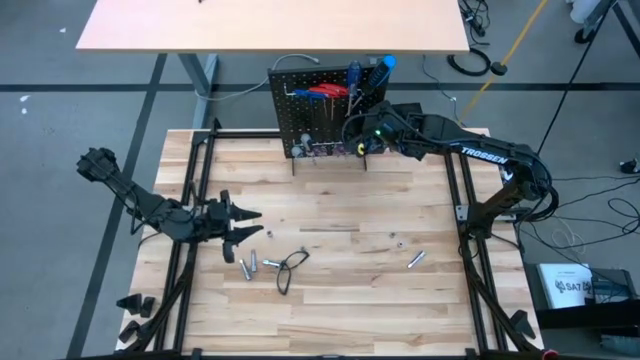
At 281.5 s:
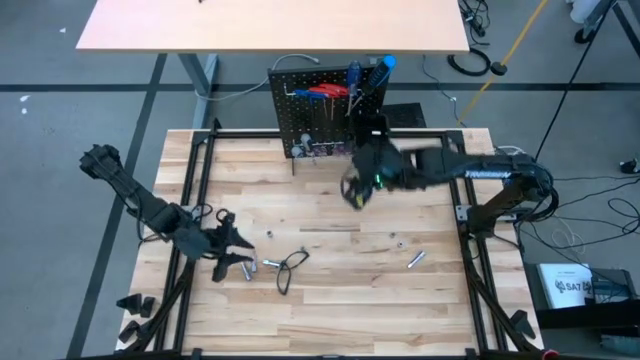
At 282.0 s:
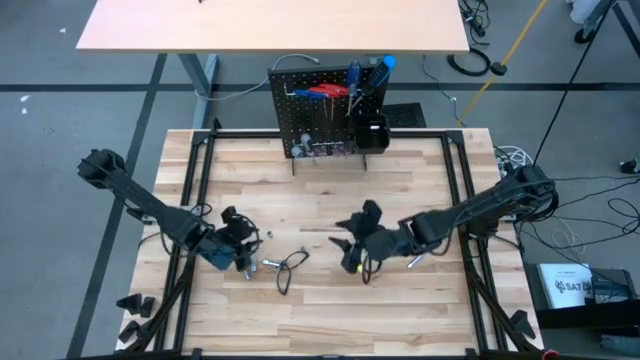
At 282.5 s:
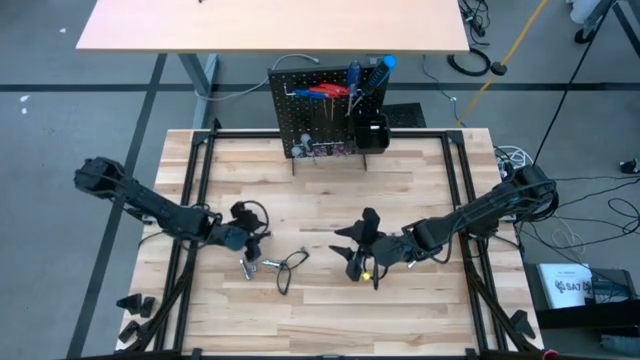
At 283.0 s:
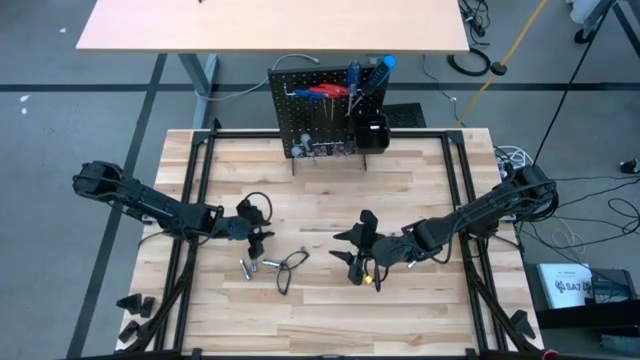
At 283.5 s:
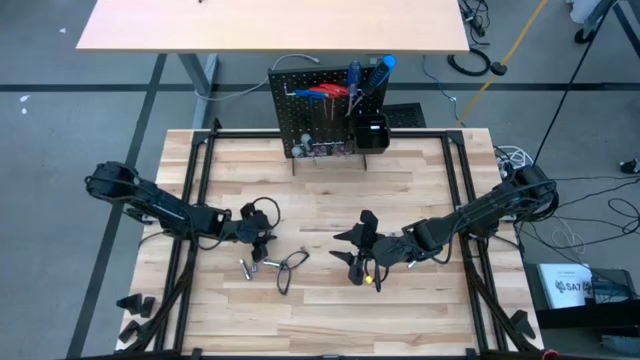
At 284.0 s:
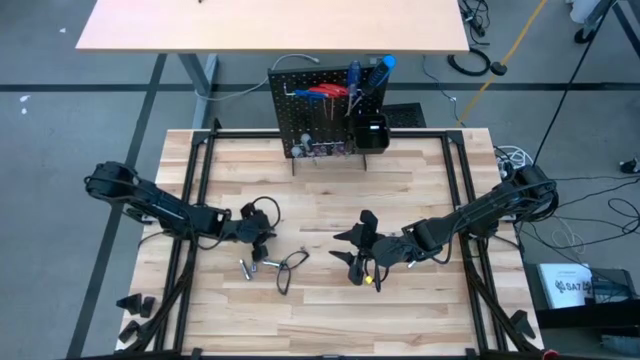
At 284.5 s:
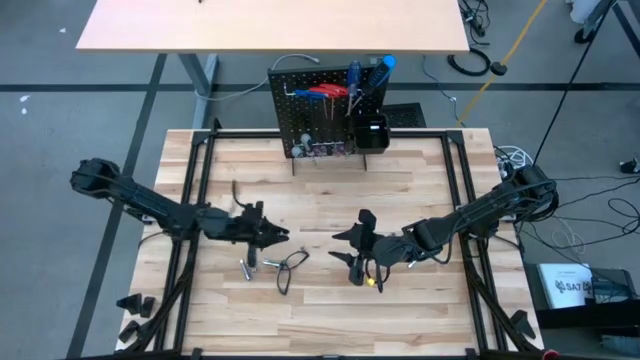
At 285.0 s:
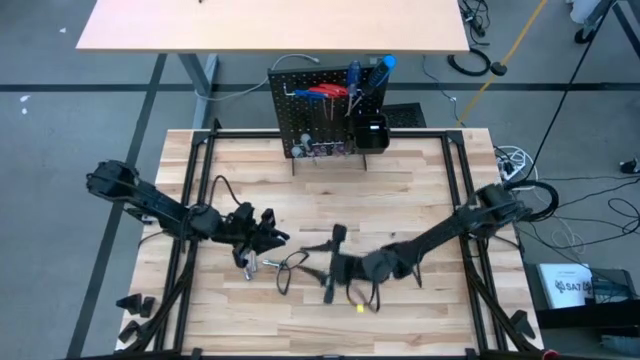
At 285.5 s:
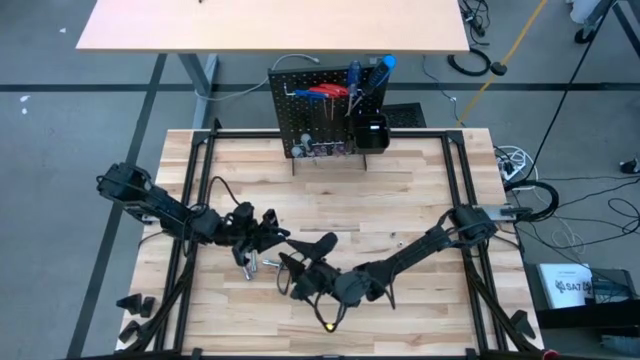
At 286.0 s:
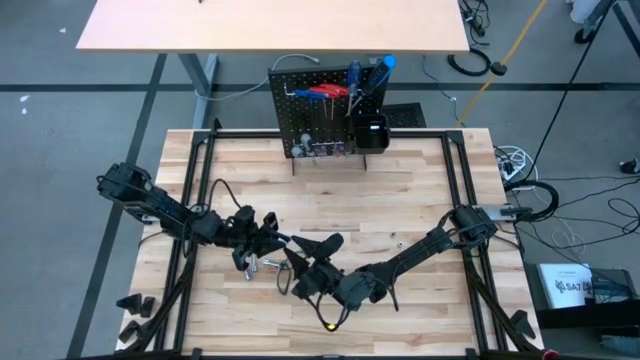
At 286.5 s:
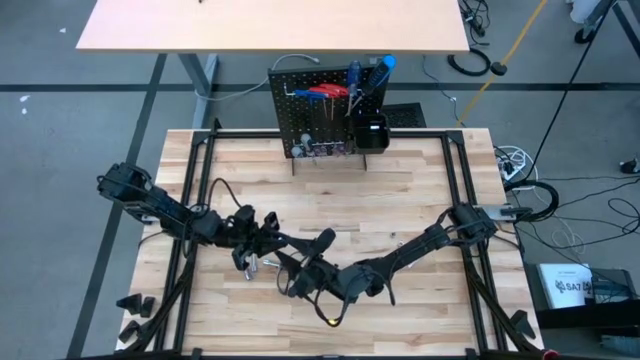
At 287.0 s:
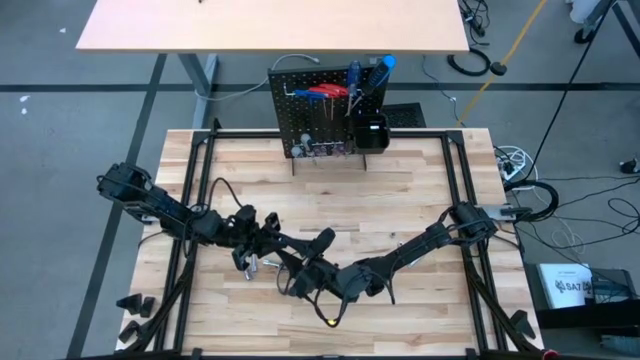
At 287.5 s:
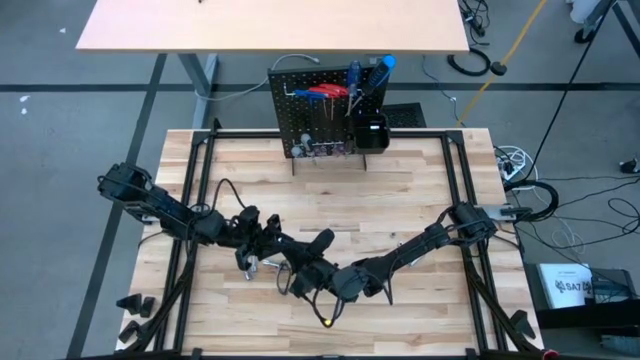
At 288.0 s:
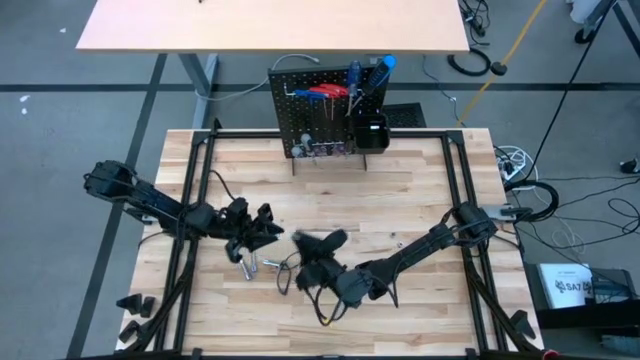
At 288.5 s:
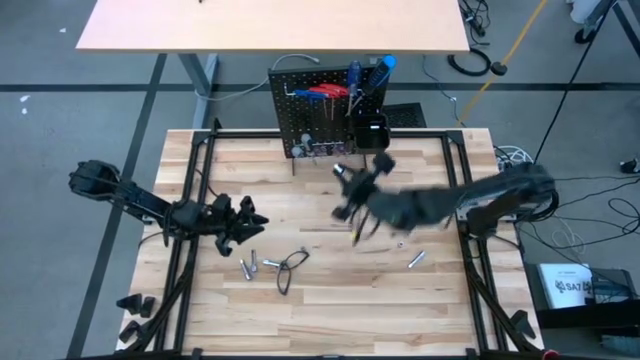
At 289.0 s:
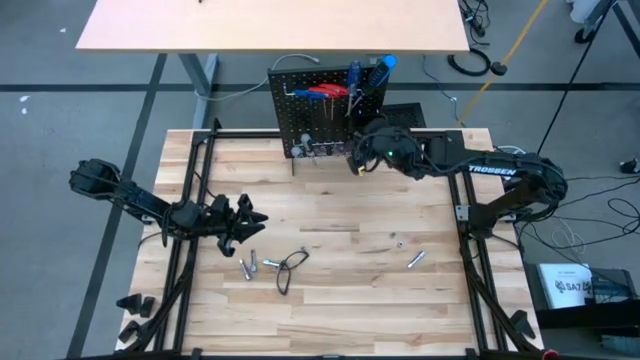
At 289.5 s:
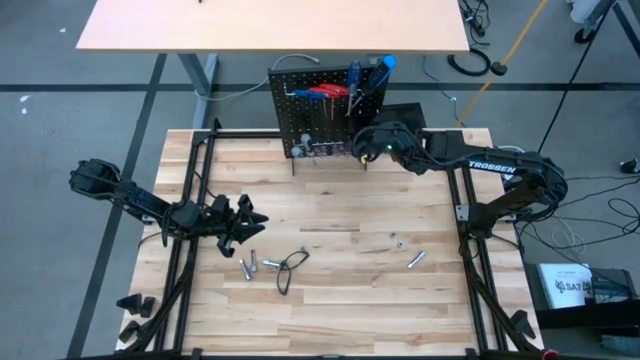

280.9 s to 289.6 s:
Task: Hang tools onto peg board
Put the socket into the black bin on the peg board

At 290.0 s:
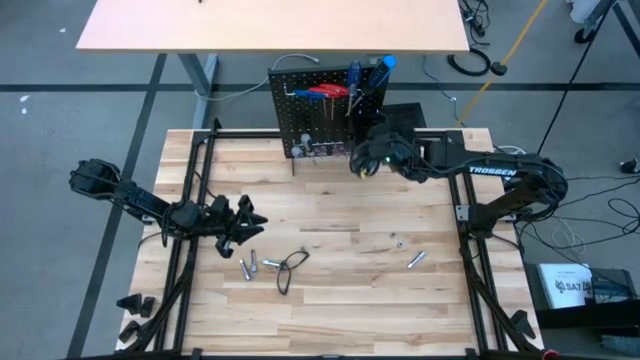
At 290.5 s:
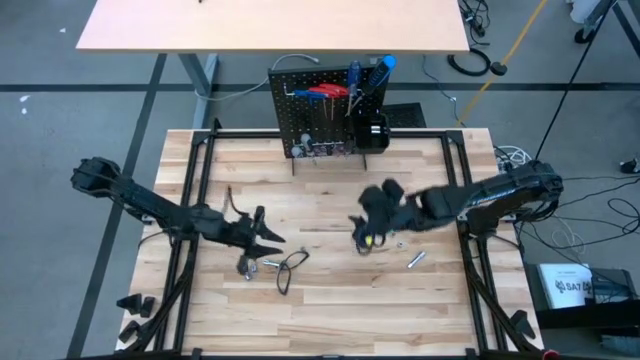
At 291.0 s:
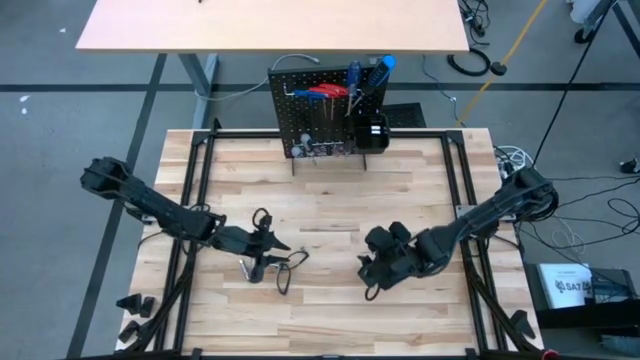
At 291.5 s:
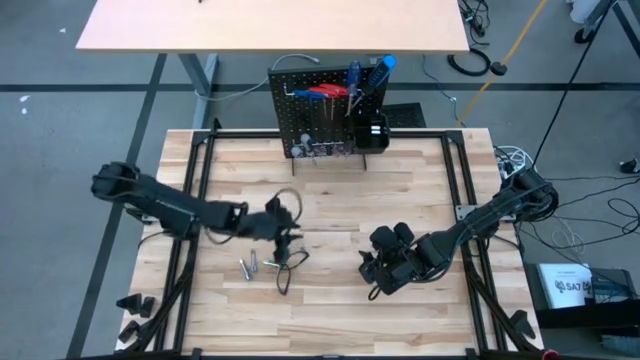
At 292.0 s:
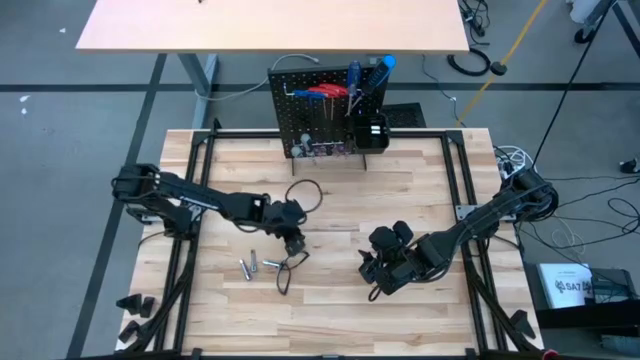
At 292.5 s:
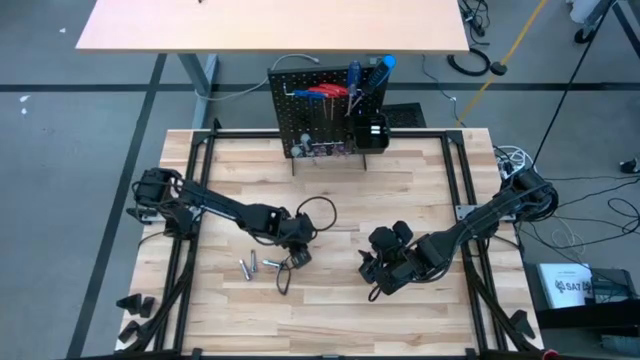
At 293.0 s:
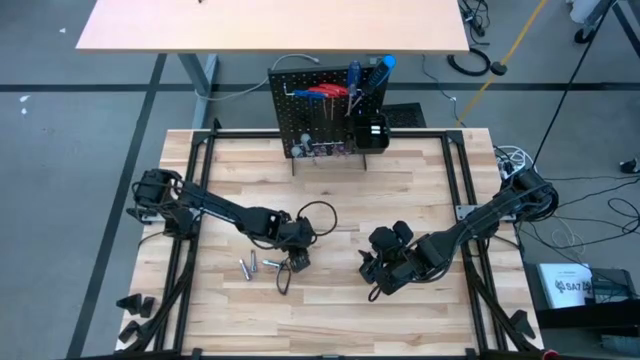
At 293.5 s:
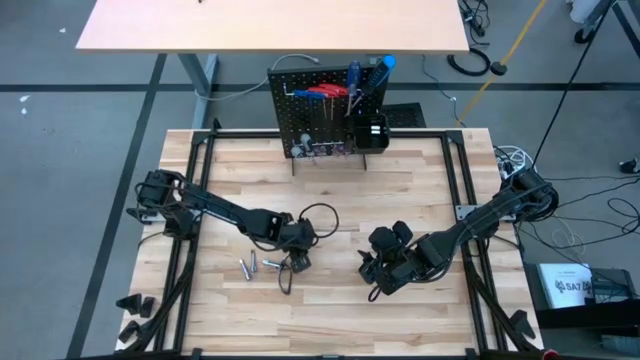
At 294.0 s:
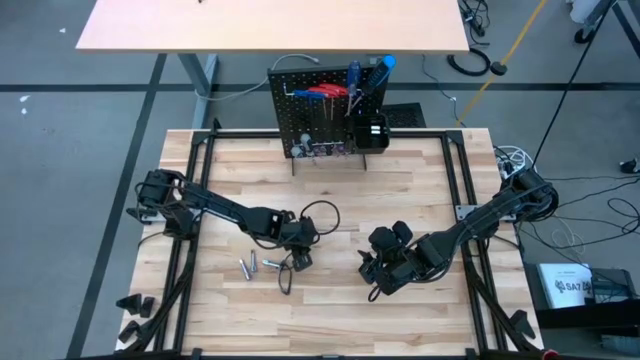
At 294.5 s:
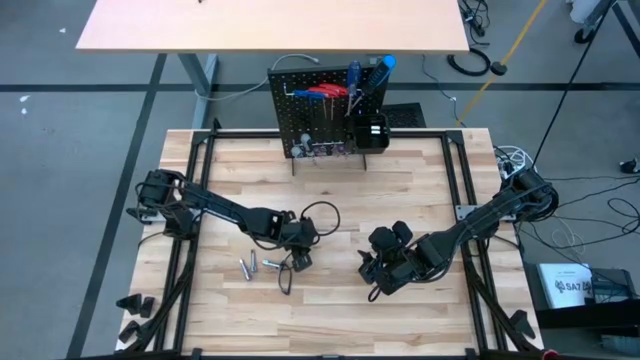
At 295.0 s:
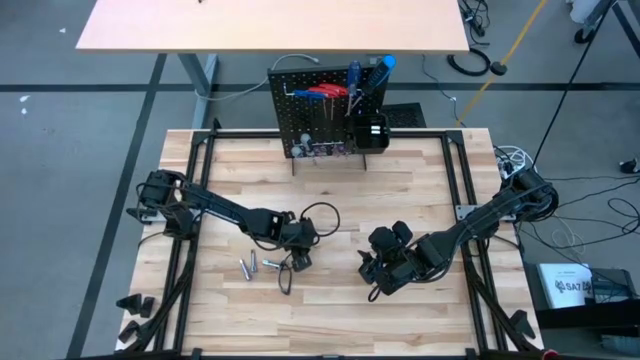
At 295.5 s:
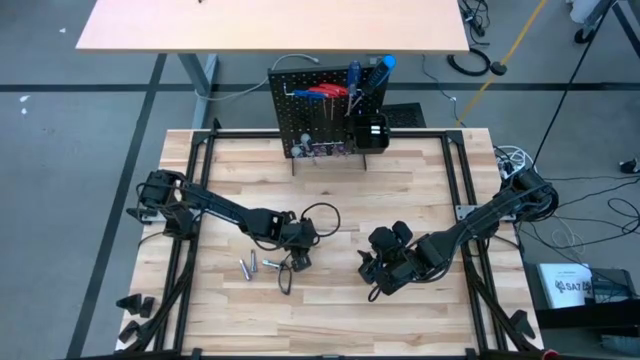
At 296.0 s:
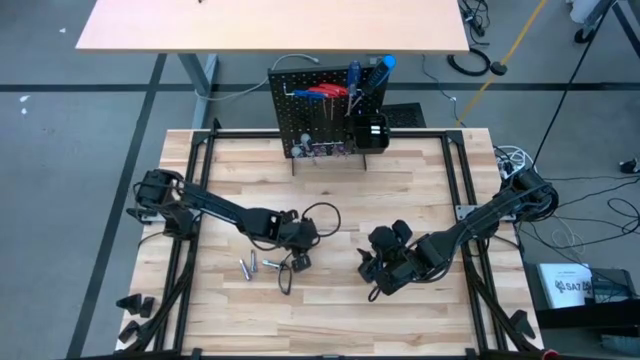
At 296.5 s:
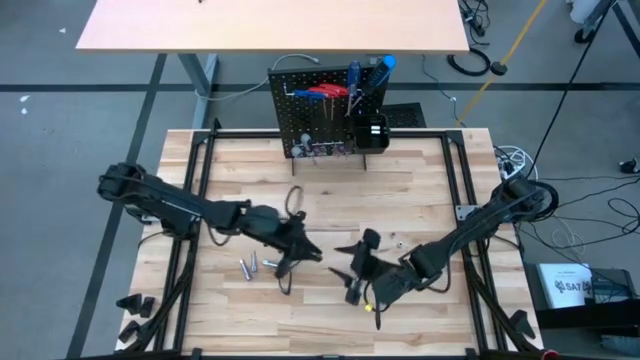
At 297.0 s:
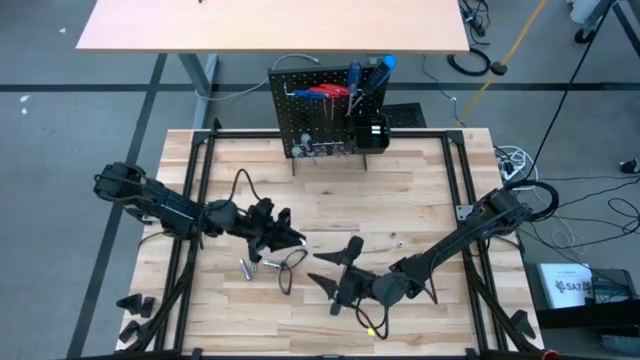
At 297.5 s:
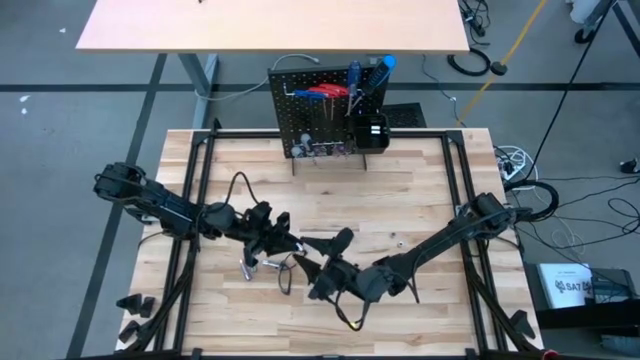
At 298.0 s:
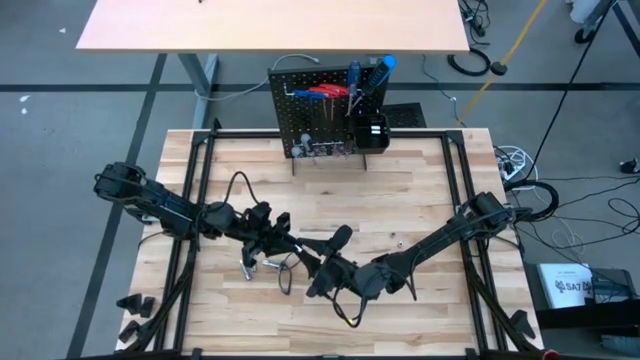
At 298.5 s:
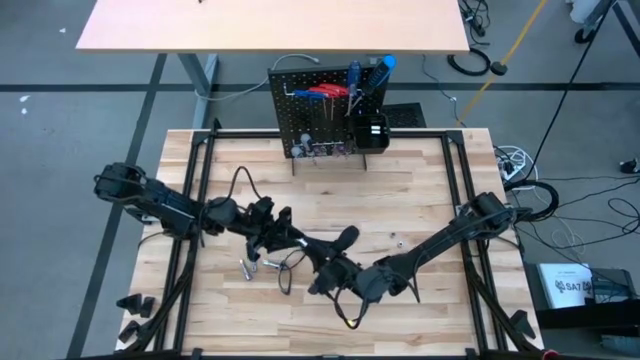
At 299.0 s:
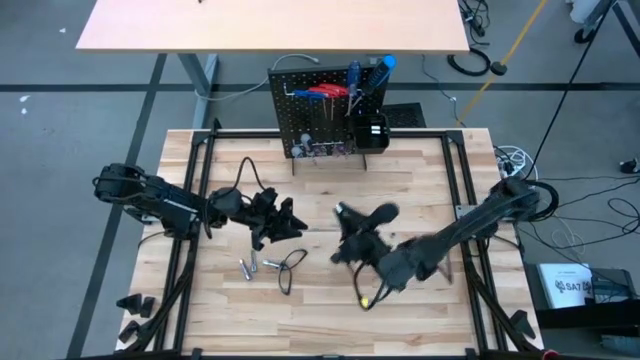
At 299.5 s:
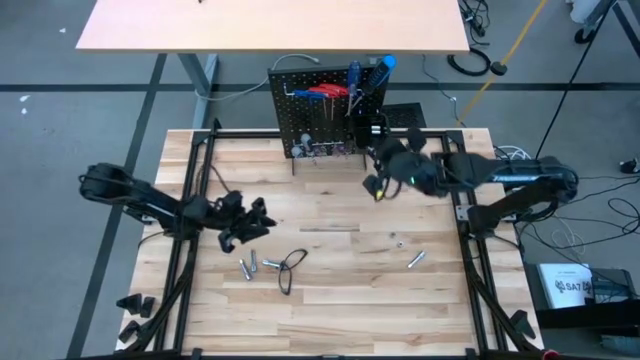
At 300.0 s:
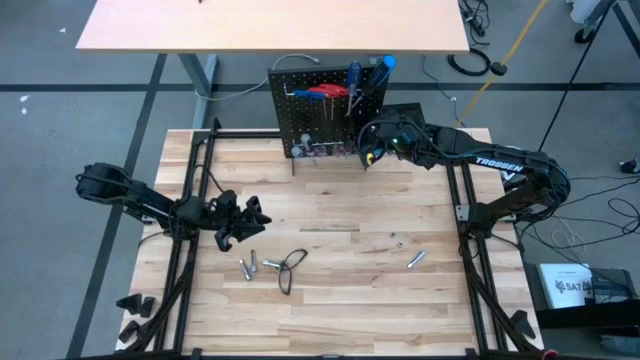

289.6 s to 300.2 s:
Put the left socket into the black bin on the peg board

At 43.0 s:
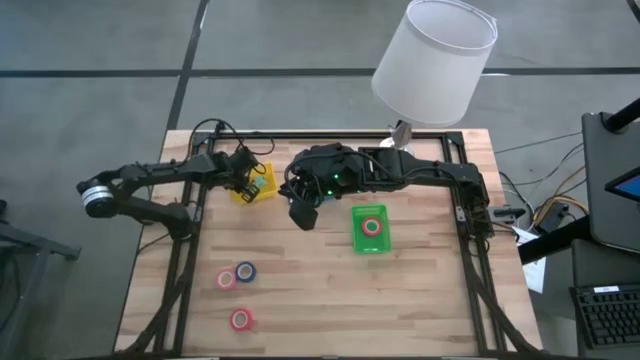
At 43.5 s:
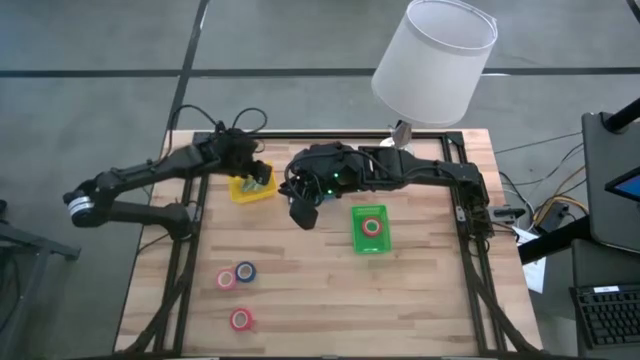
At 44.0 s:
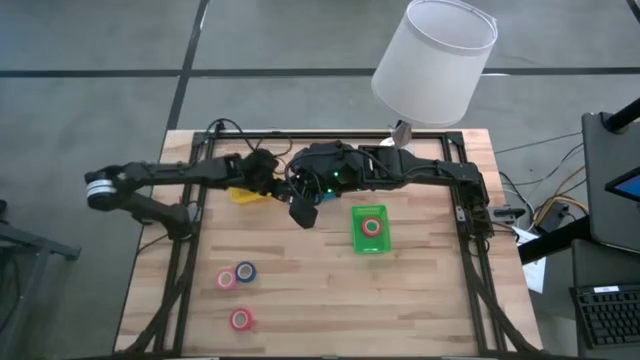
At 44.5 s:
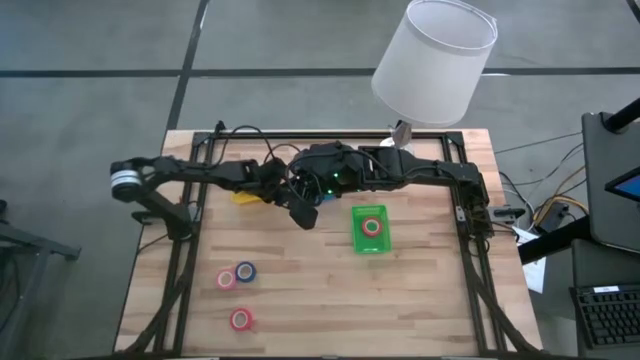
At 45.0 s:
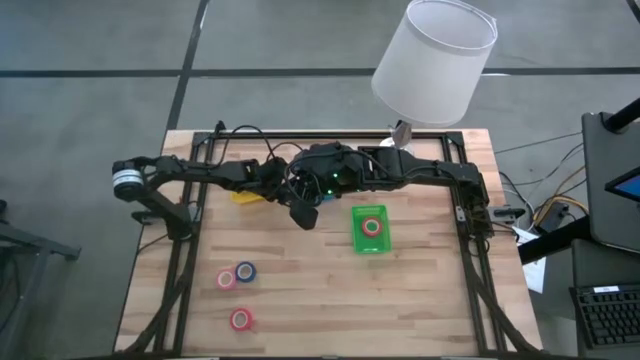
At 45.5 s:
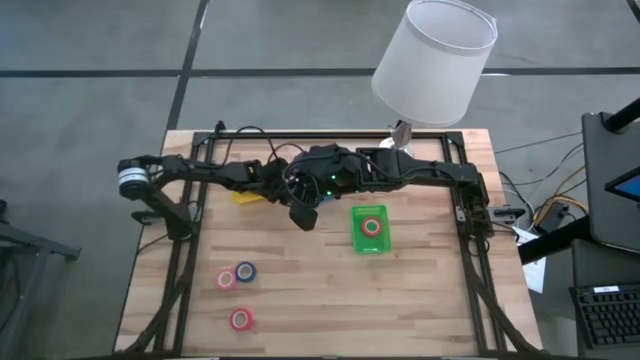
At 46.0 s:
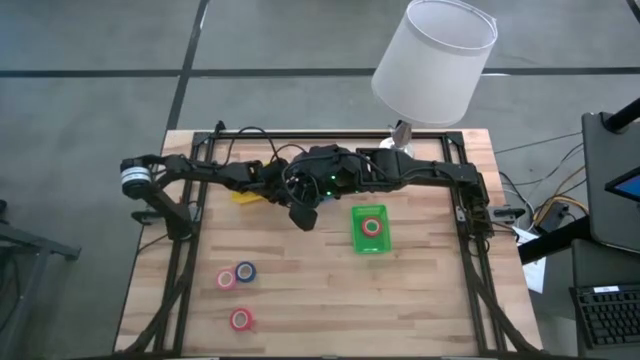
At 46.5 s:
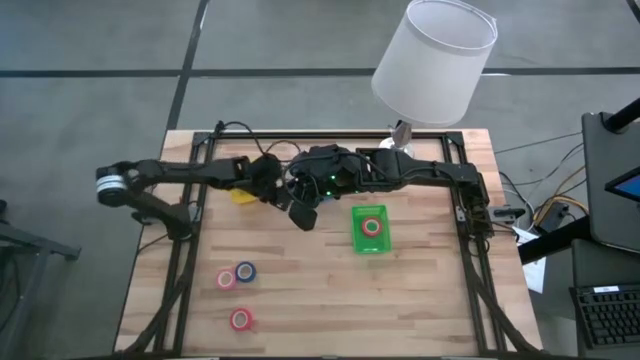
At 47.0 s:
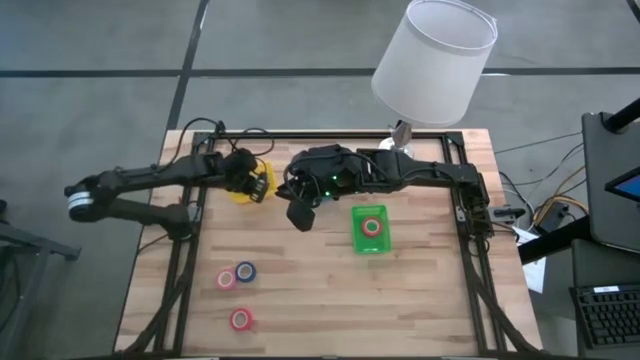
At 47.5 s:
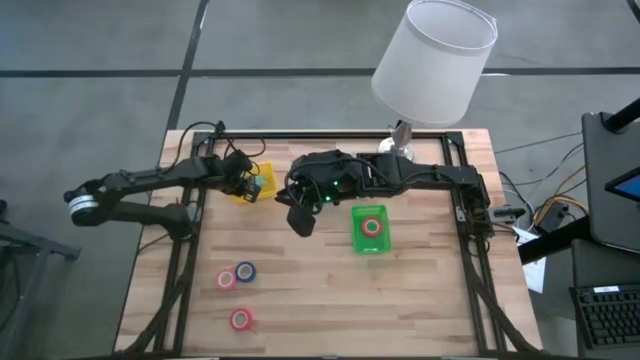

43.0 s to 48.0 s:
Task: Pick and place Stapler, Stapler remover, tape
Put the black staple remover into the yellow bin
